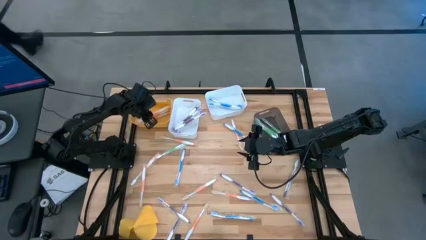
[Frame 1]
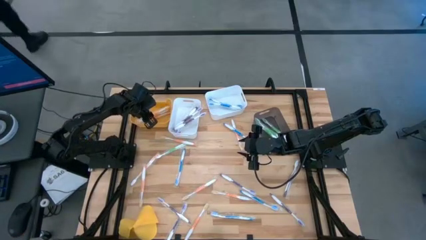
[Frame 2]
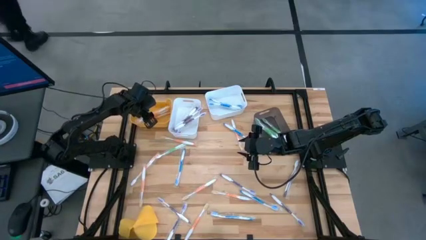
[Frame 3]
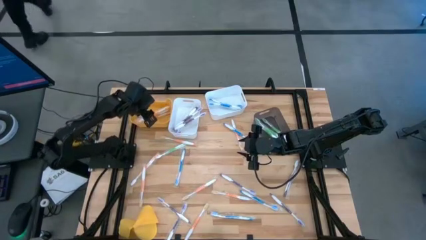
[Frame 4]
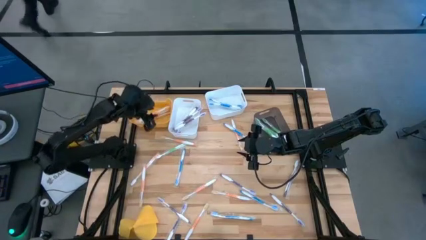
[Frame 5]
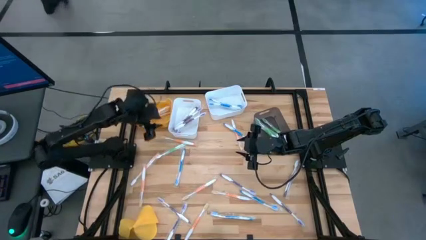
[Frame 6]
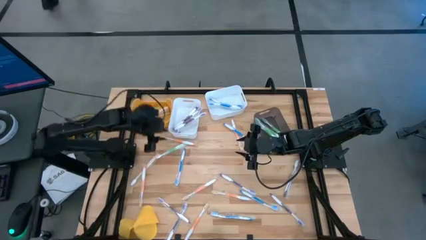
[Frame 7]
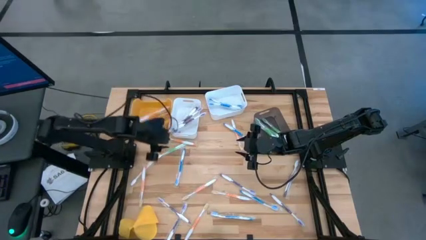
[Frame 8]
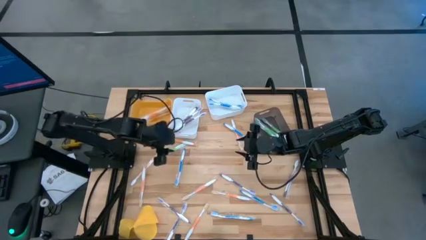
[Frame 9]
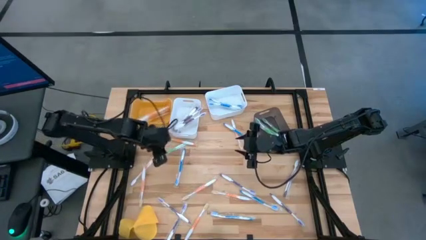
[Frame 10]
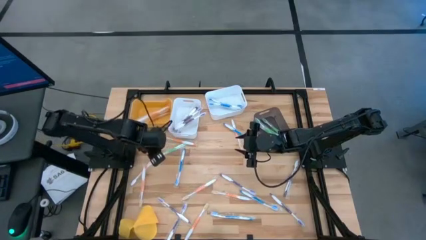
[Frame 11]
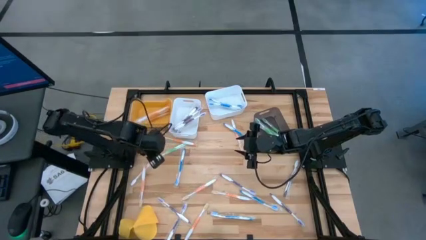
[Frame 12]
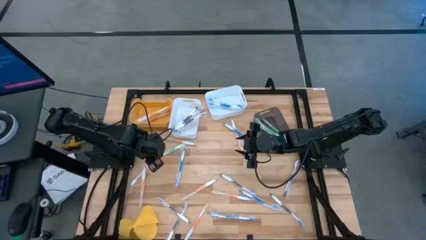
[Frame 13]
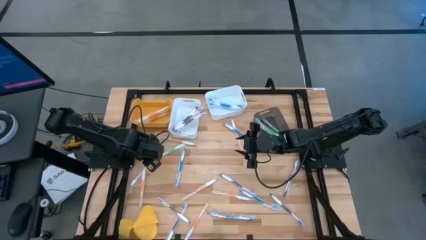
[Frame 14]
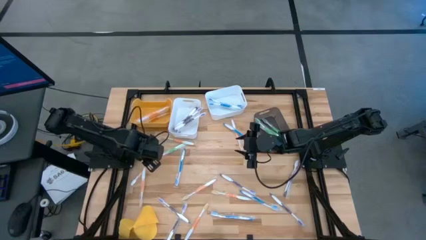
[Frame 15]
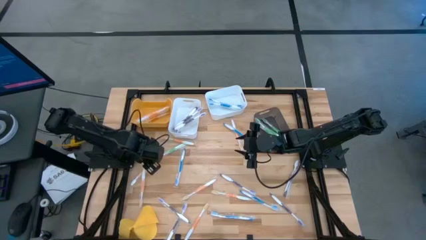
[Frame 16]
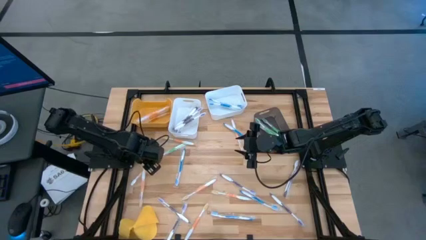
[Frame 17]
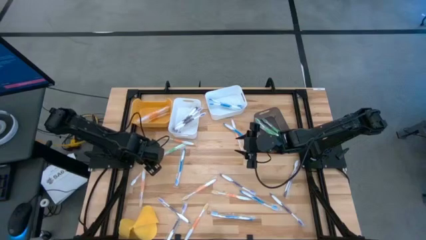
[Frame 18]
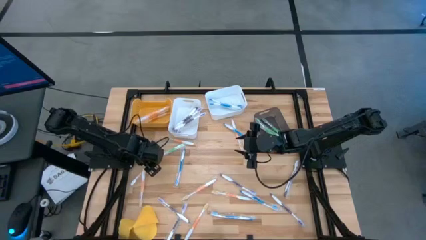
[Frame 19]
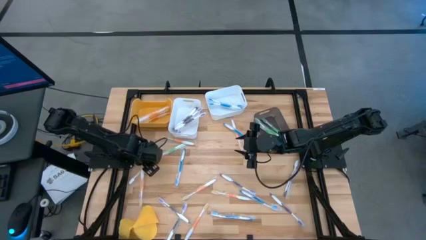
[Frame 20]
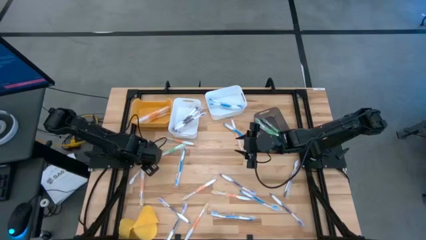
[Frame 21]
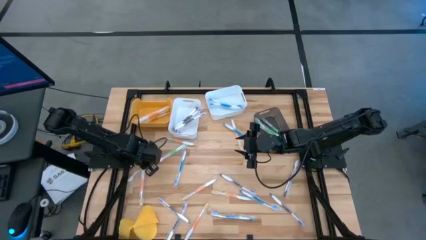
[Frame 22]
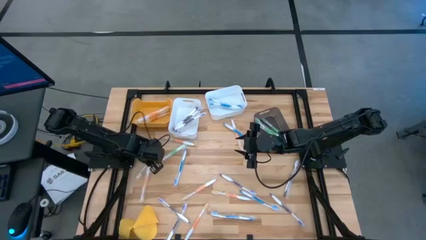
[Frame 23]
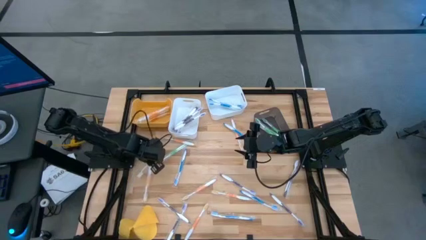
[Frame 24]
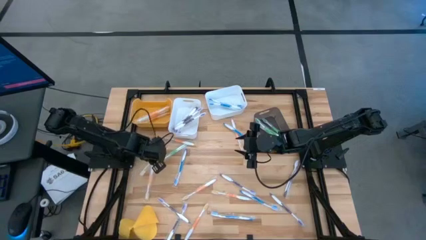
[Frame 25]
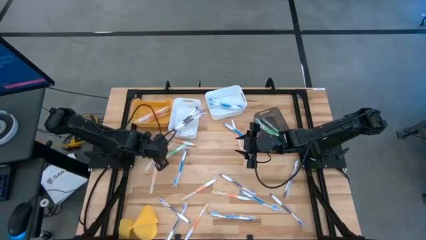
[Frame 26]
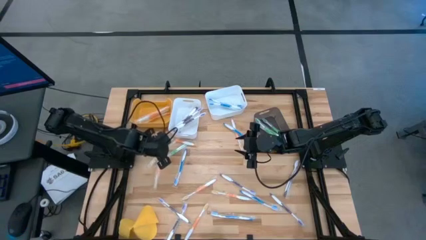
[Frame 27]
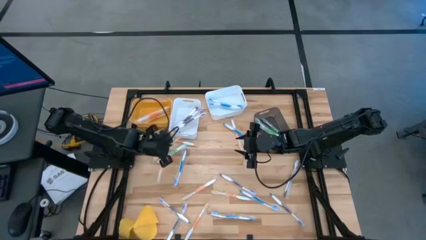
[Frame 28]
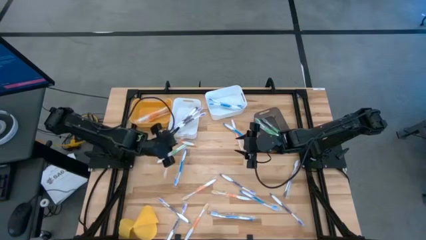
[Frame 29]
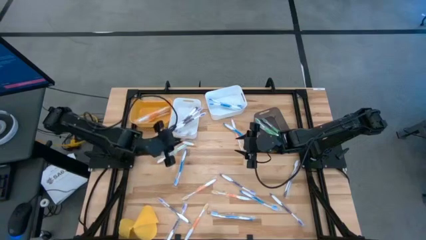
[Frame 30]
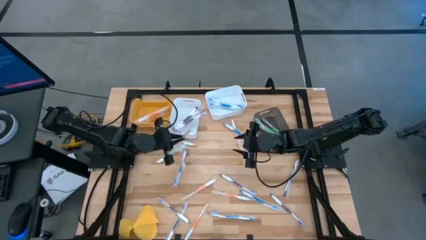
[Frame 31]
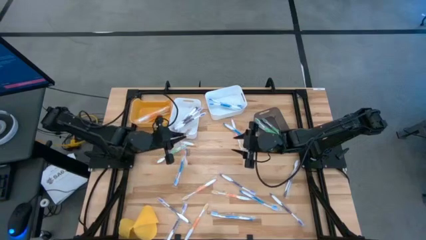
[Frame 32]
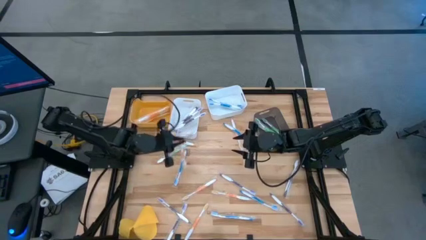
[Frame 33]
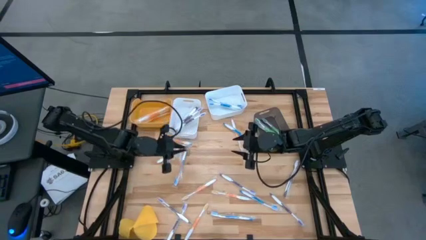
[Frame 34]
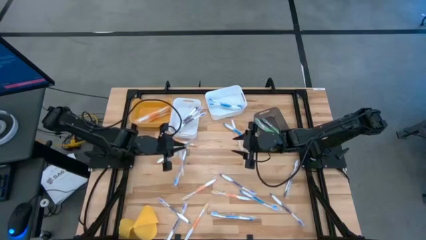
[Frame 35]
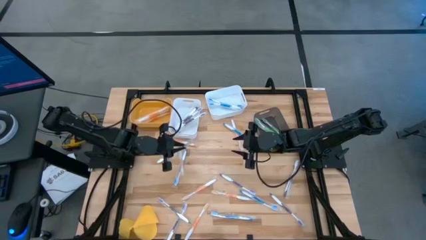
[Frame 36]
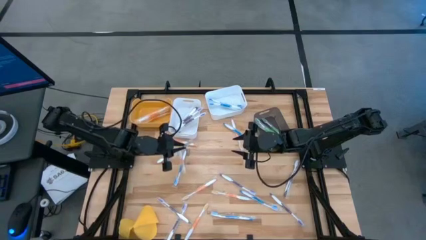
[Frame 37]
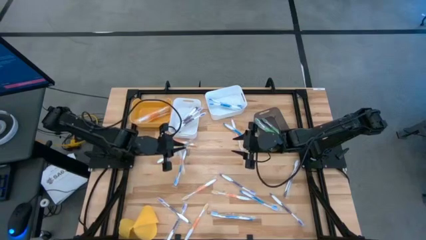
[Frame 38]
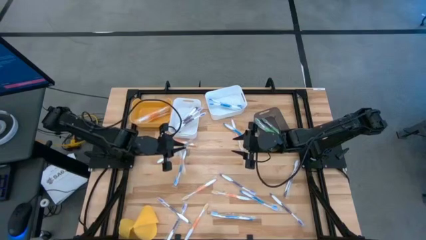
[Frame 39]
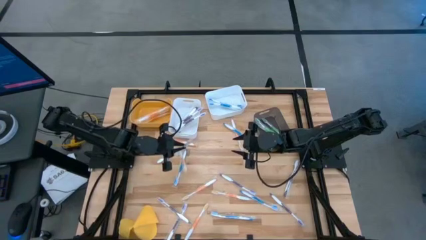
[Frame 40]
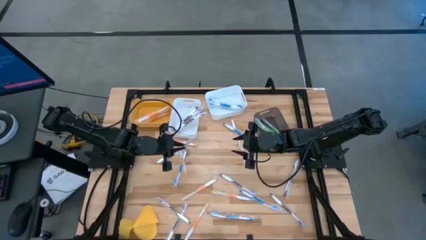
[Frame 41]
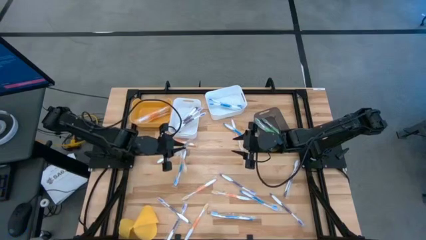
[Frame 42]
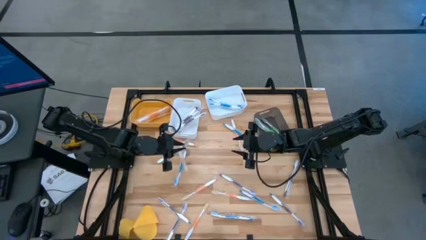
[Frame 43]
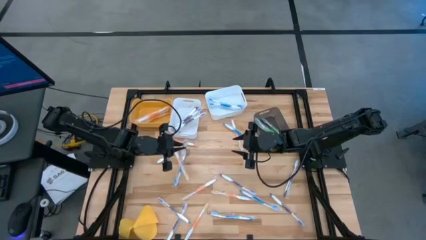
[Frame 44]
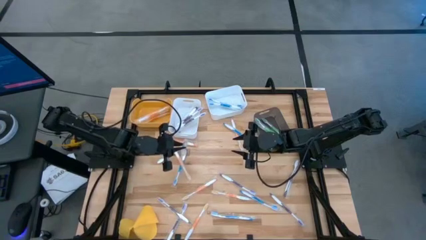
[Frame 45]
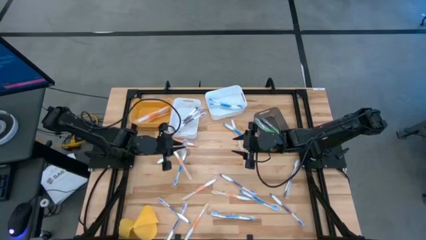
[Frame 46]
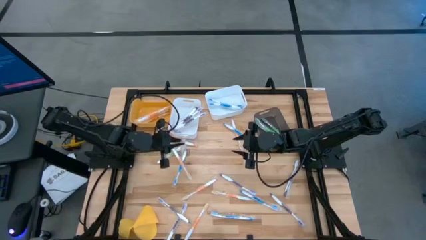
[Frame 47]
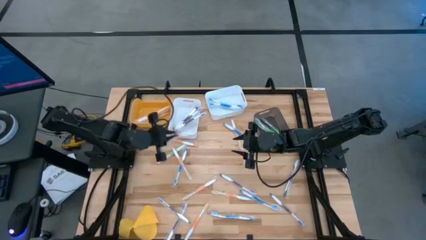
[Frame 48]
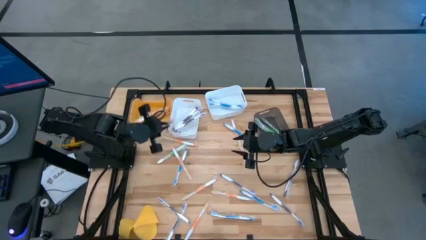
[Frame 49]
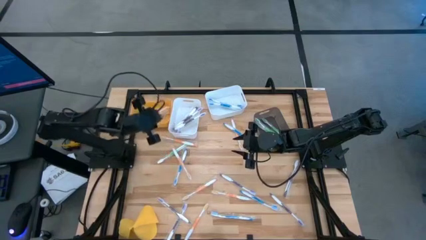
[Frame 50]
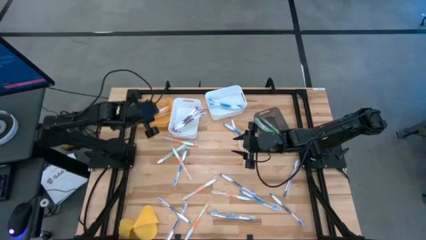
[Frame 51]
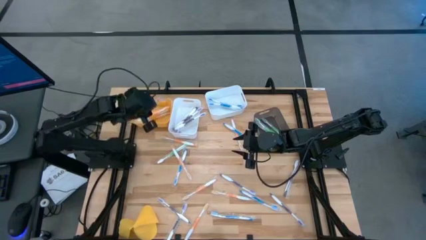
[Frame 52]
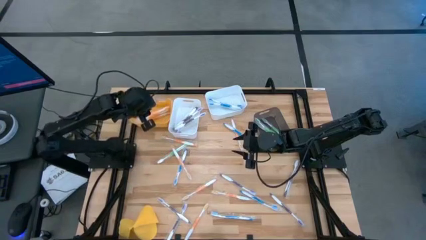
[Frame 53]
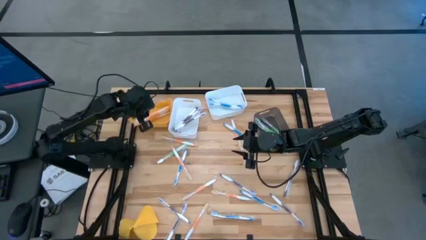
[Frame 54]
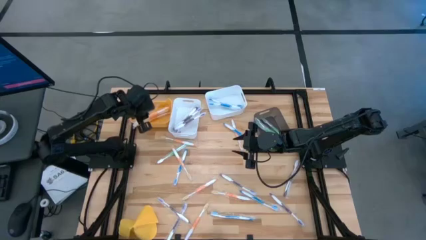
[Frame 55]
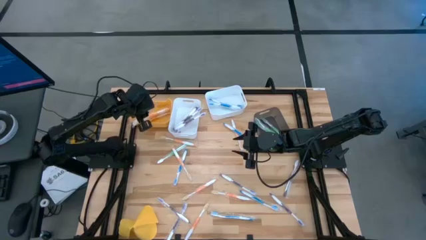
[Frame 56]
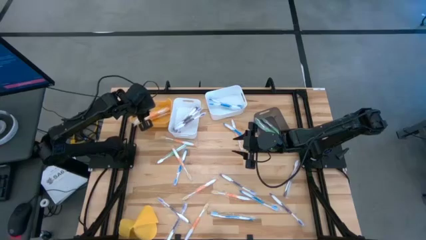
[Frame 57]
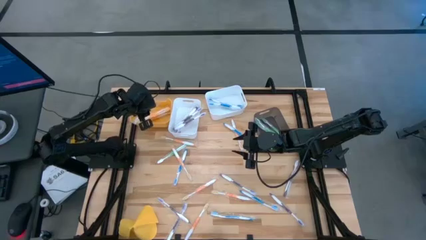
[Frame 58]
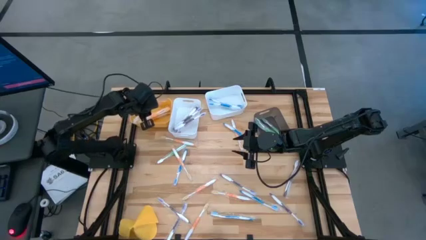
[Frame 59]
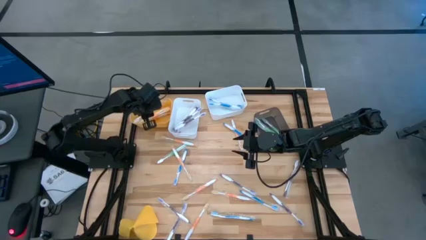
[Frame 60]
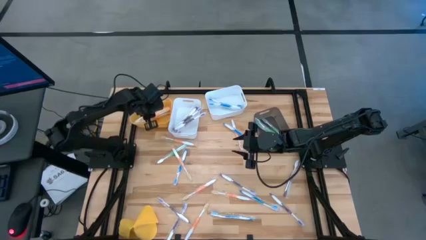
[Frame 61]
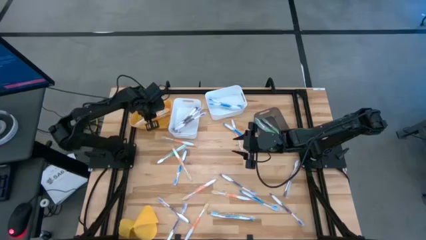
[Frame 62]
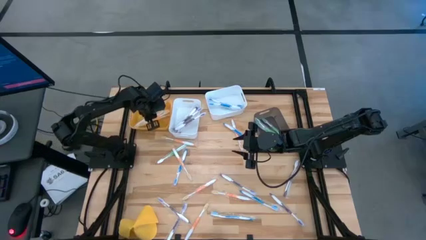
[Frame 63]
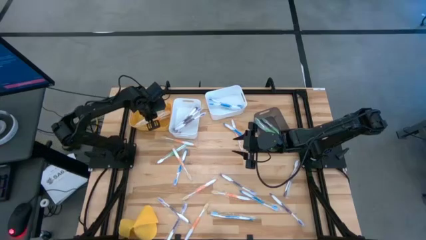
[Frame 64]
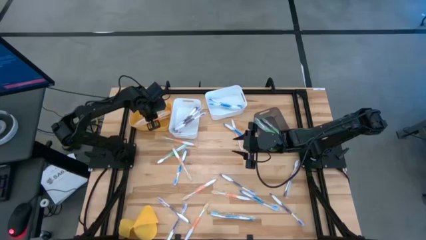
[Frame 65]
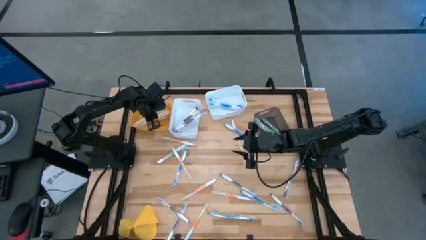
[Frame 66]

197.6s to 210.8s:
Task: Pick & Place Toothbrushes
Put the orange toothbrush into the yellow bin
